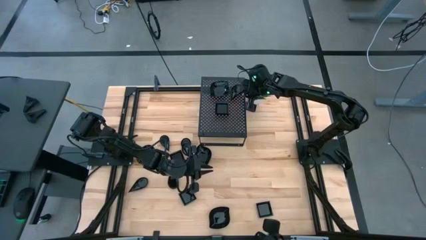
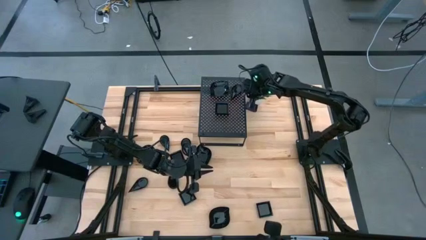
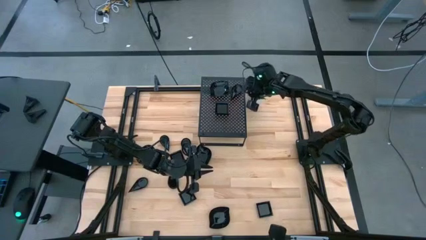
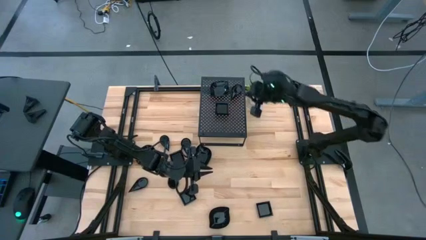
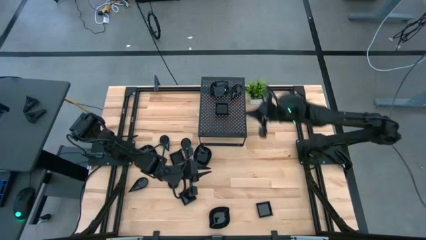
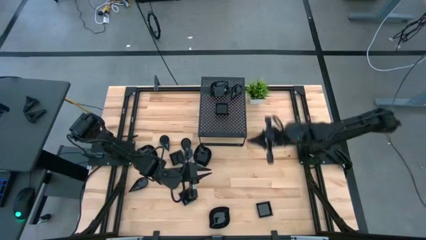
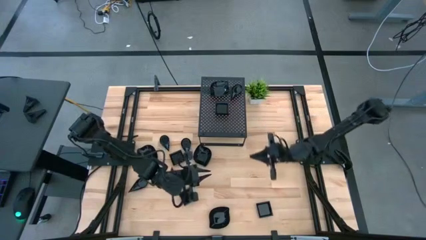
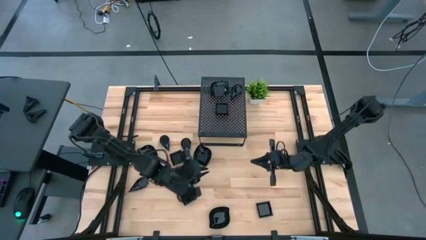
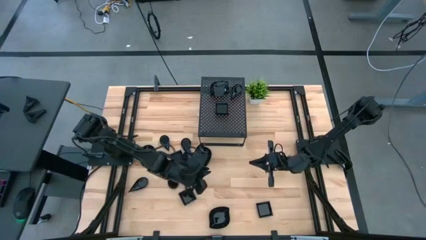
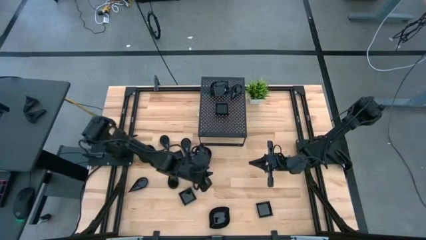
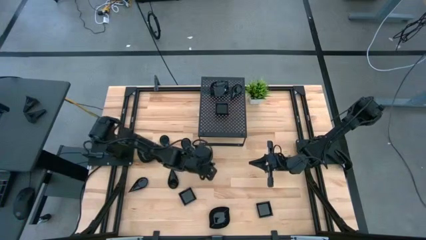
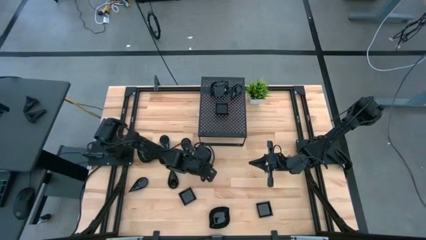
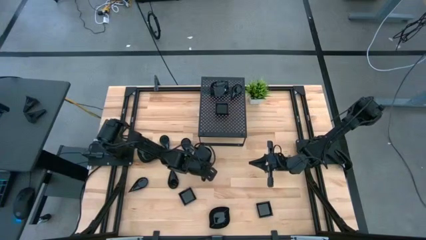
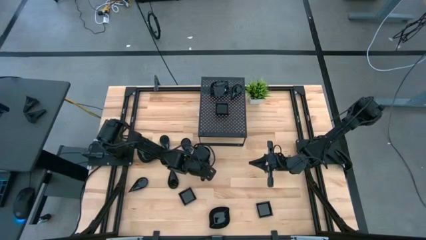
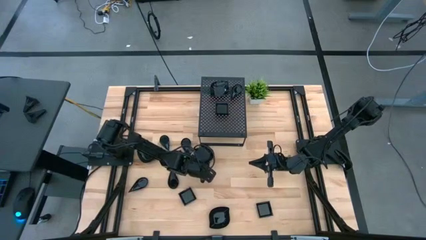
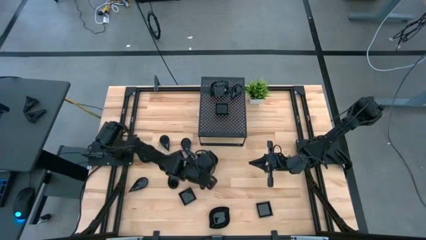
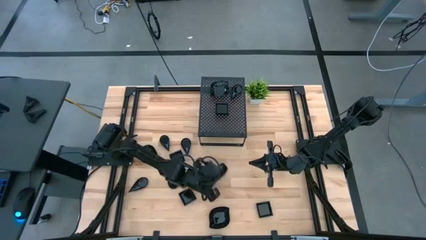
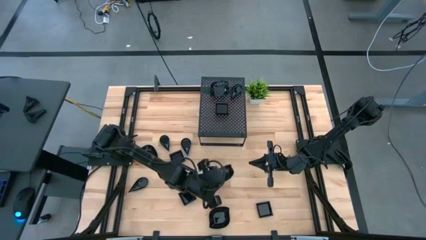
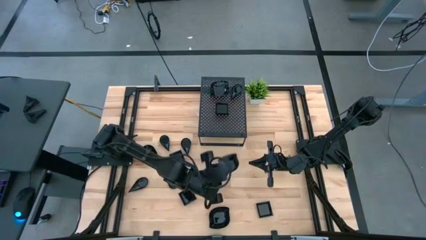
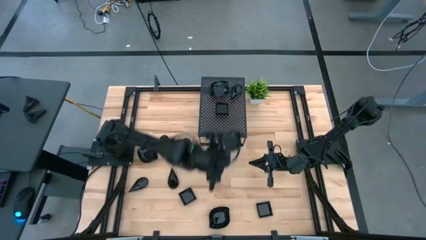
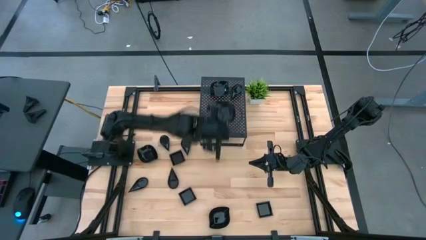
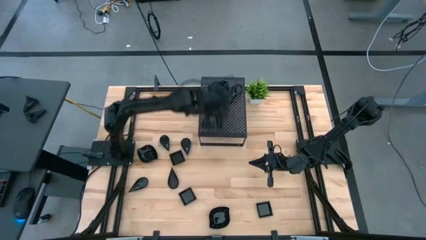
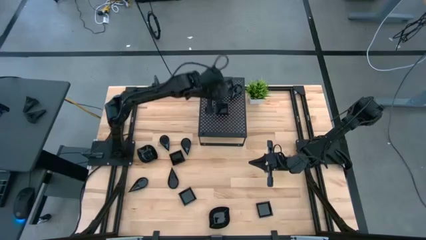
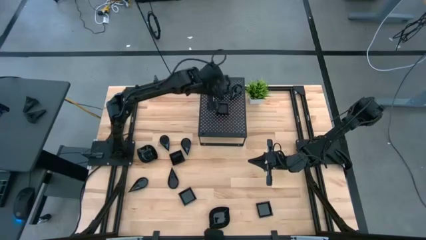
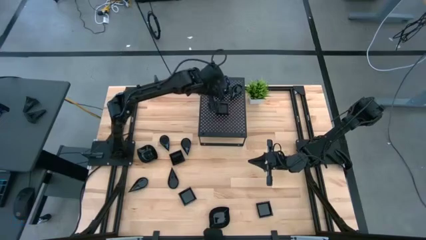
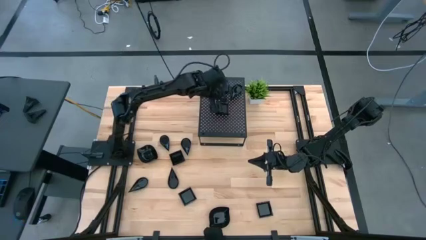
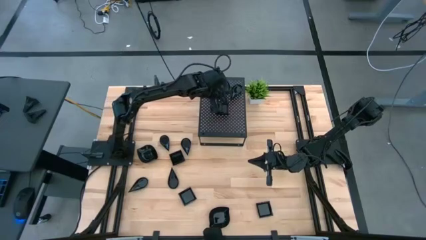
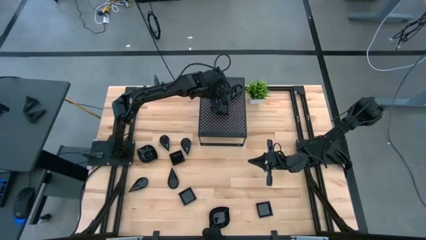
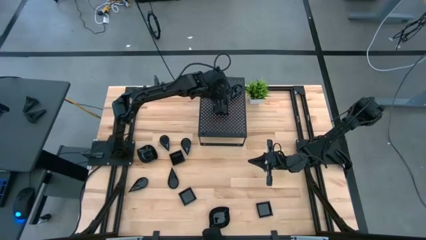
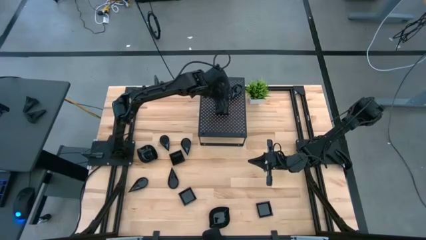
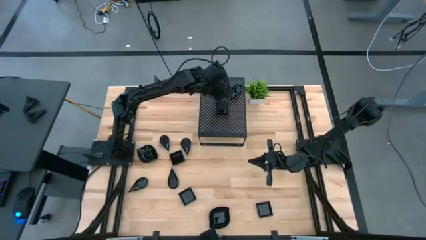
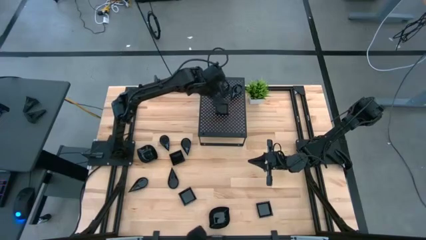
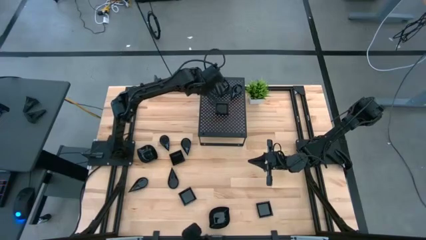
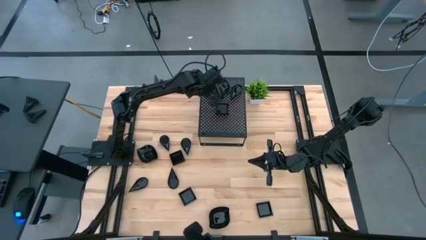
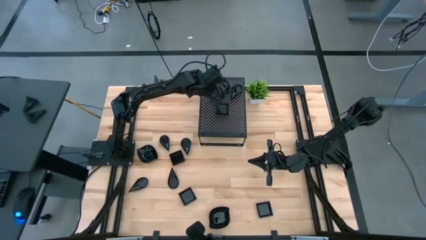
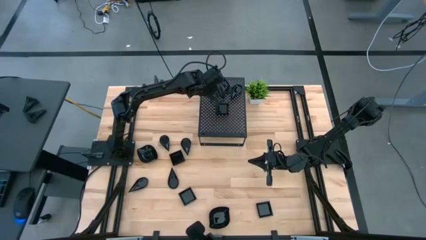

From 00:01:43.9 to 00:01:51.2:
Task: Pick & Place Mini shaped plates
Stack the black leaf-shaped plate on top of the black leaf-shaped plate on the shelf

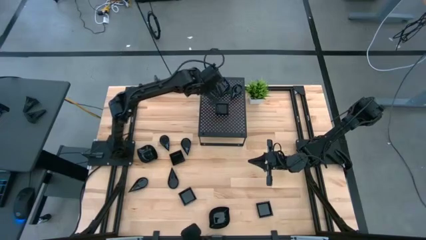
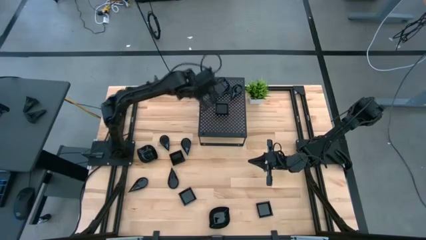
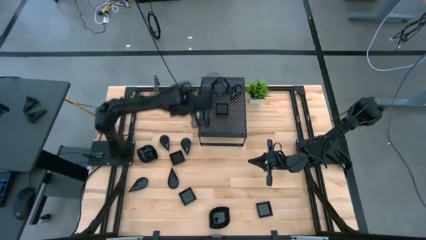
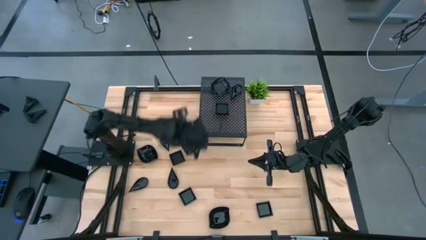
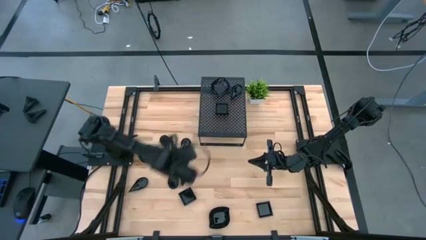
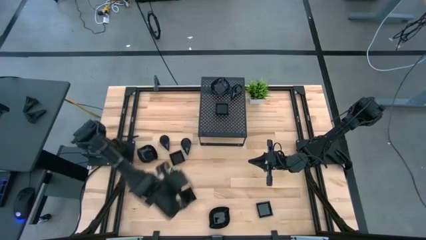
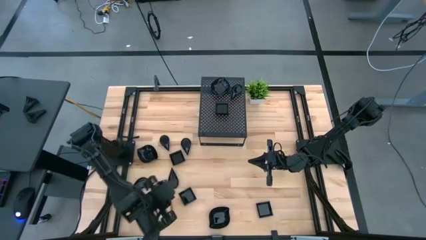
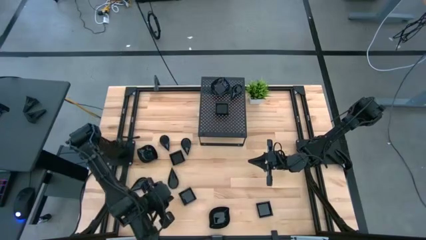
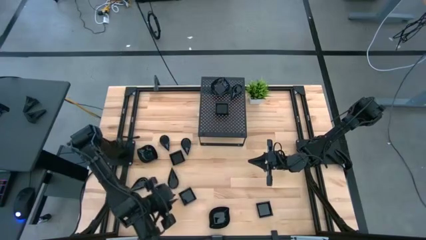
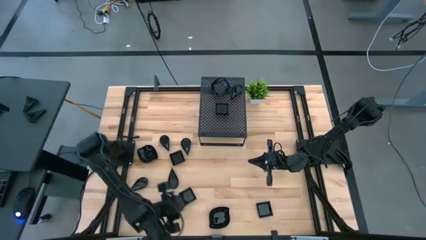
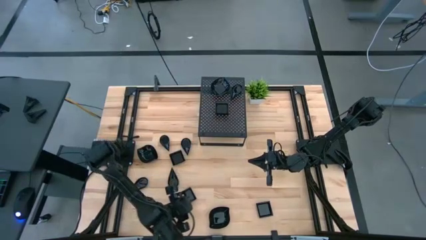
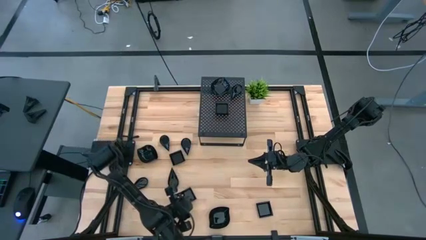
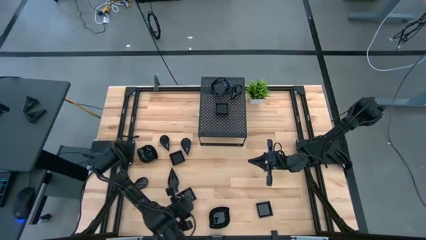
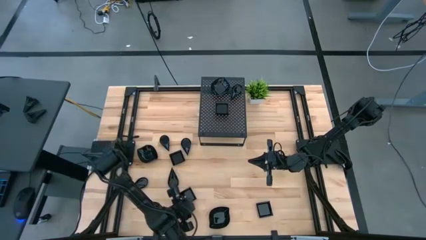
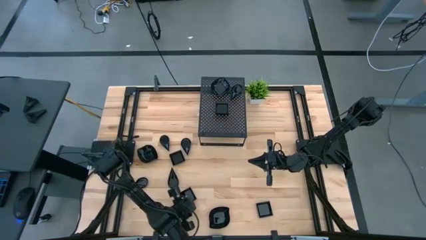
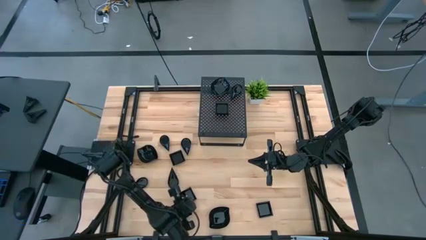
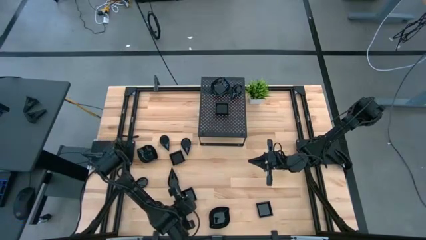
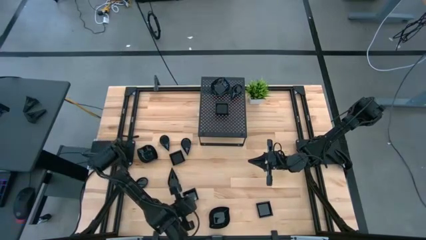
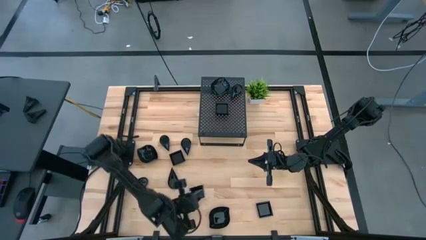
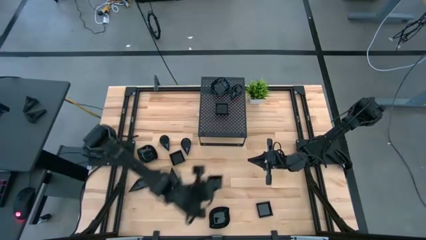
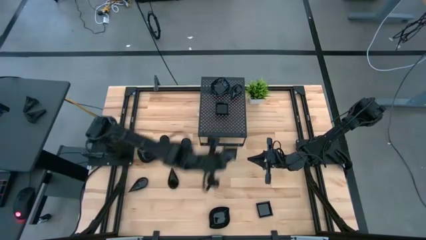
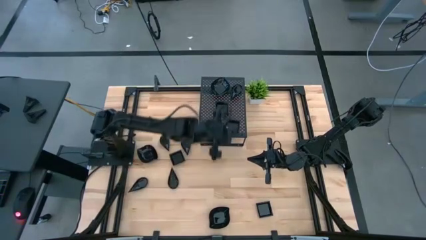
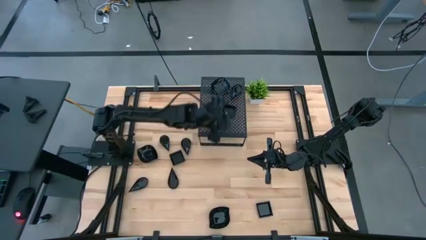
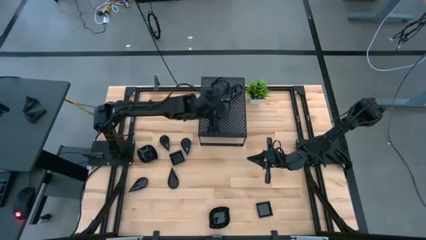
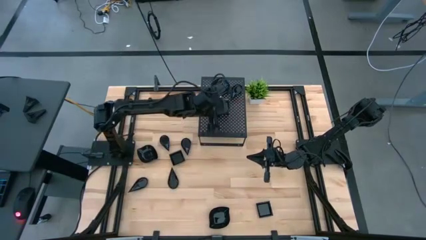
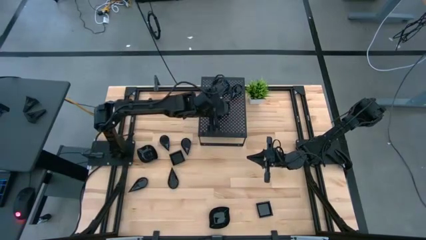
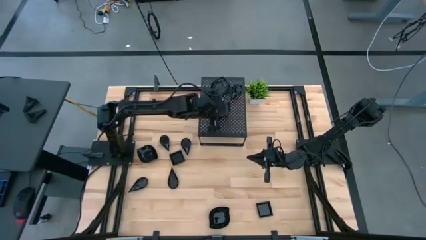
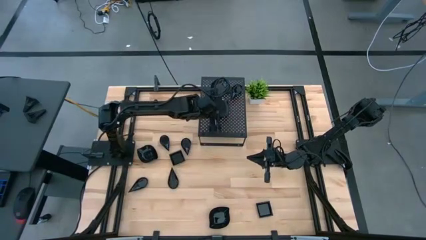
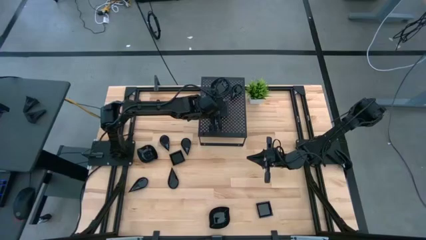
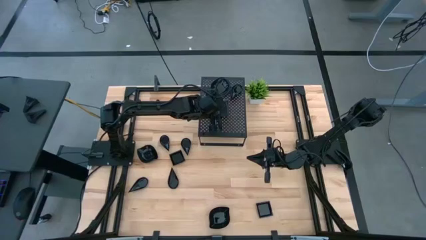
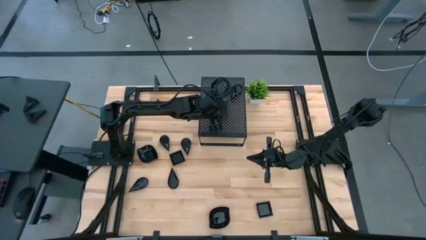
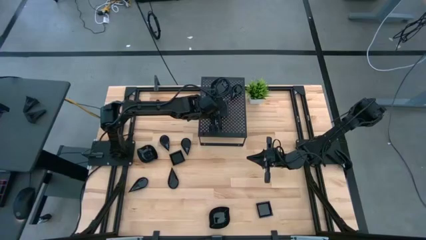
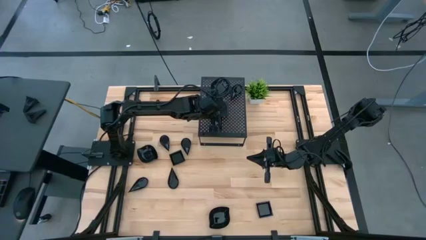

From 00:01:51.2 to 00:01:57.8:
Stack the black square plate on top of the black square plate on the shelf
